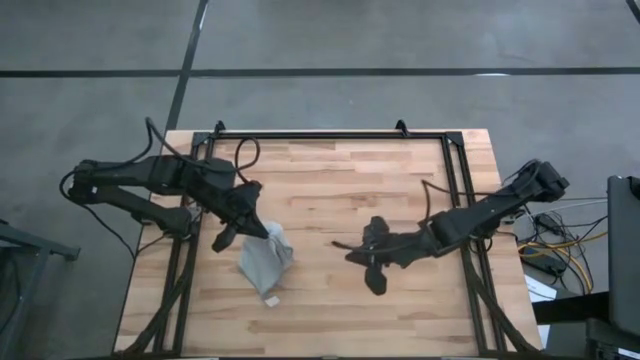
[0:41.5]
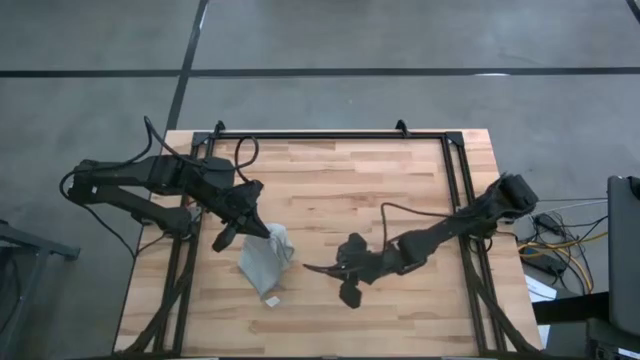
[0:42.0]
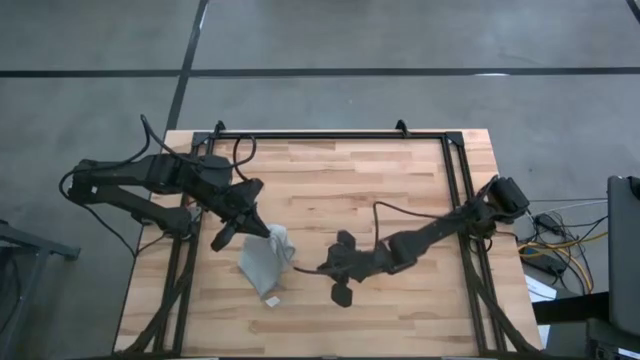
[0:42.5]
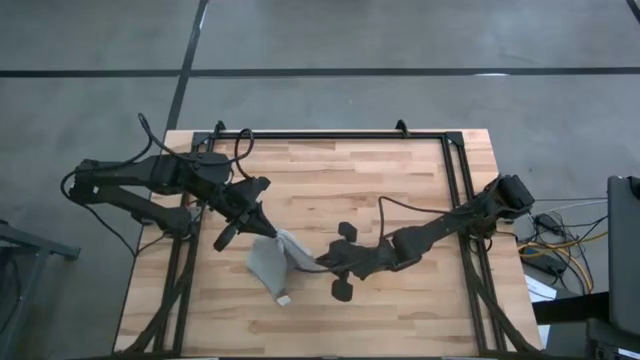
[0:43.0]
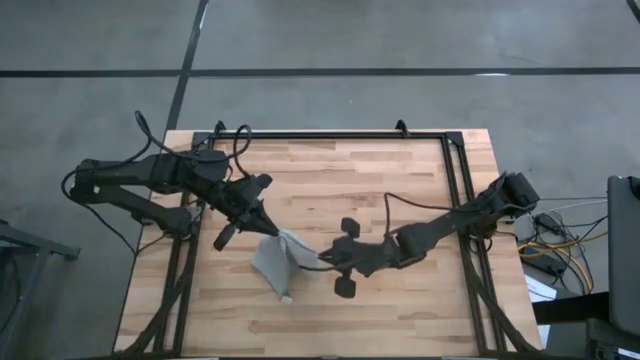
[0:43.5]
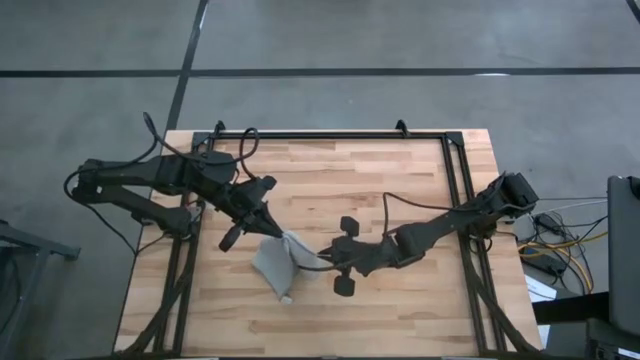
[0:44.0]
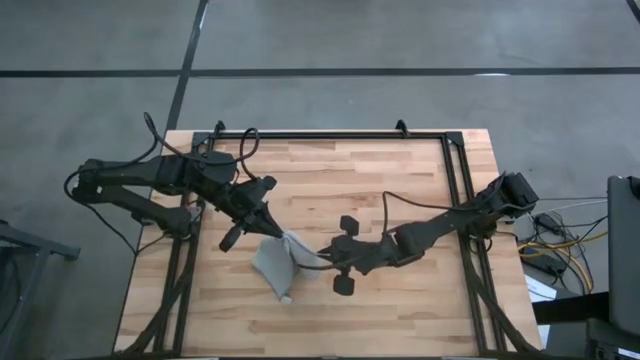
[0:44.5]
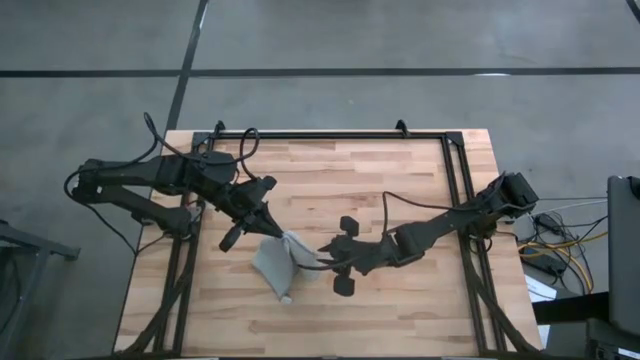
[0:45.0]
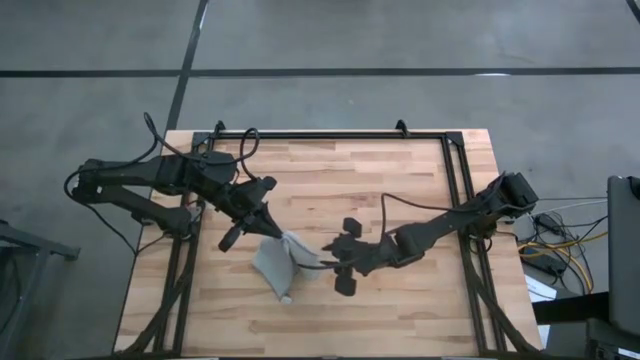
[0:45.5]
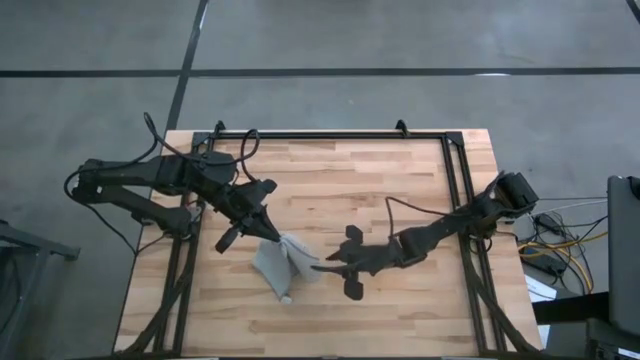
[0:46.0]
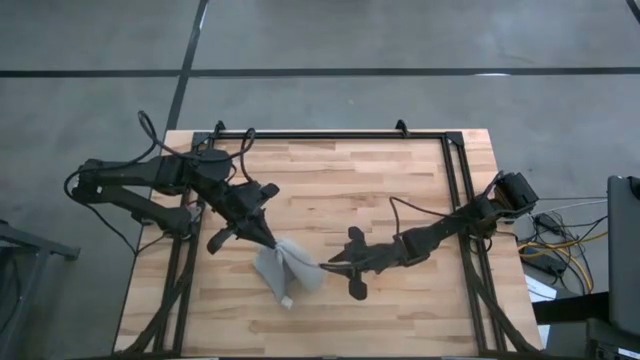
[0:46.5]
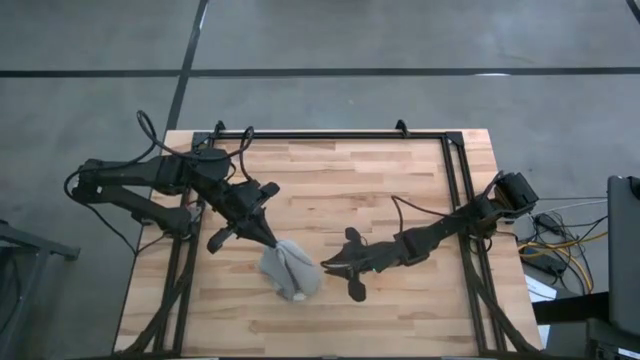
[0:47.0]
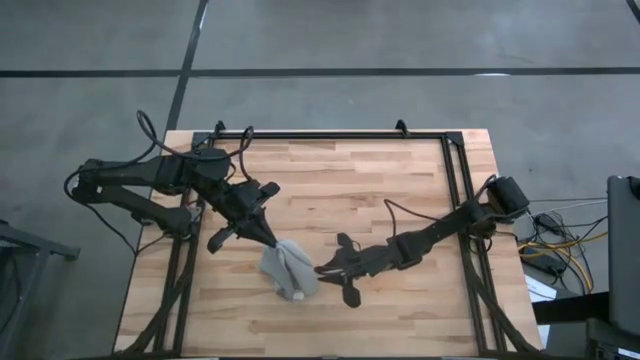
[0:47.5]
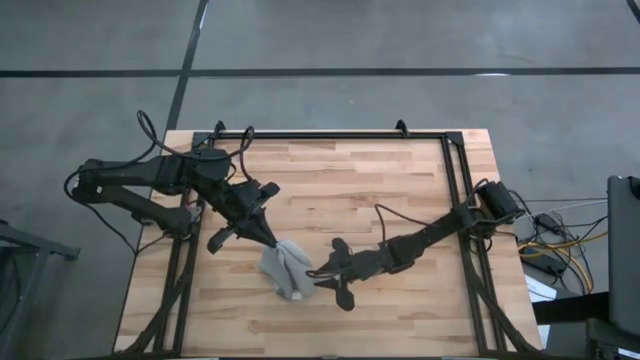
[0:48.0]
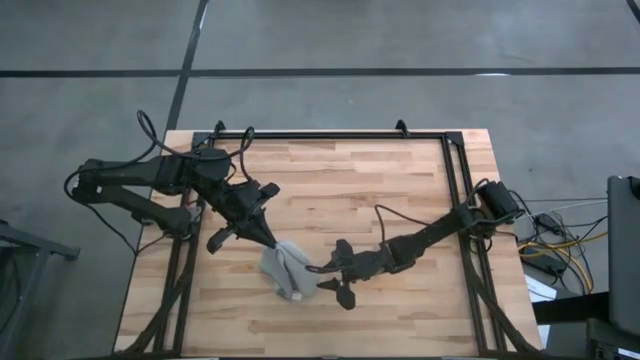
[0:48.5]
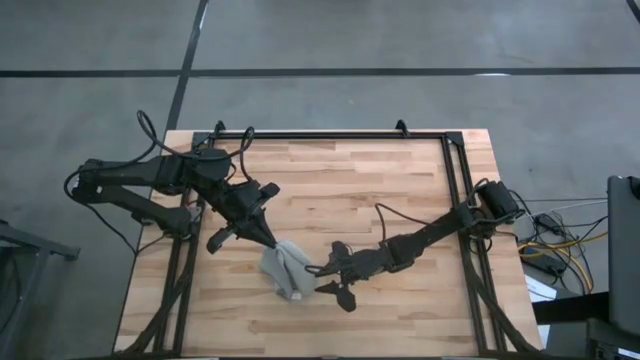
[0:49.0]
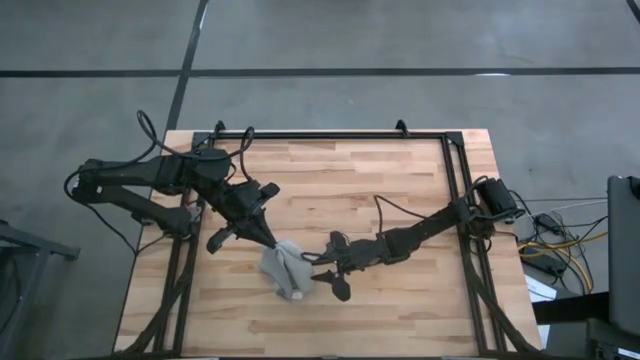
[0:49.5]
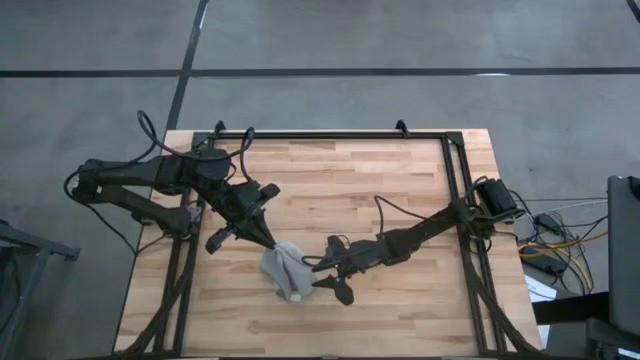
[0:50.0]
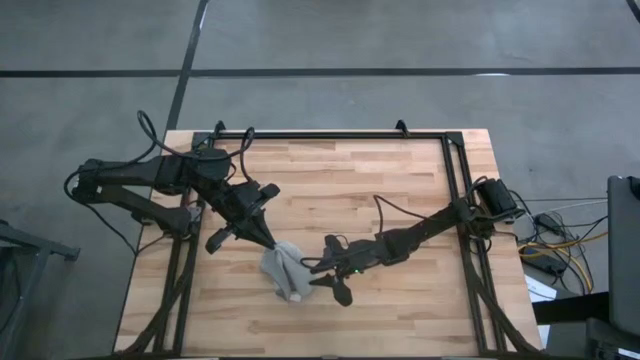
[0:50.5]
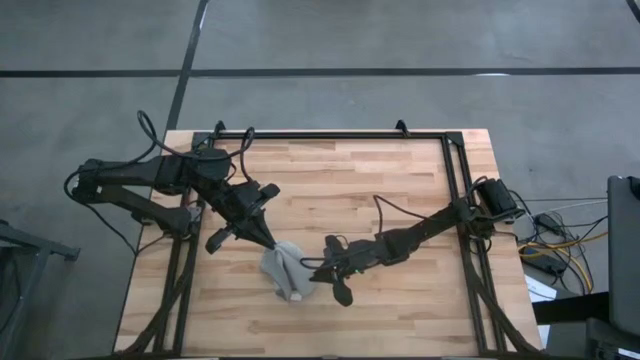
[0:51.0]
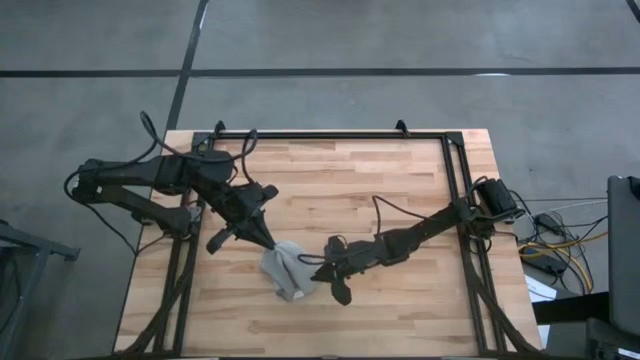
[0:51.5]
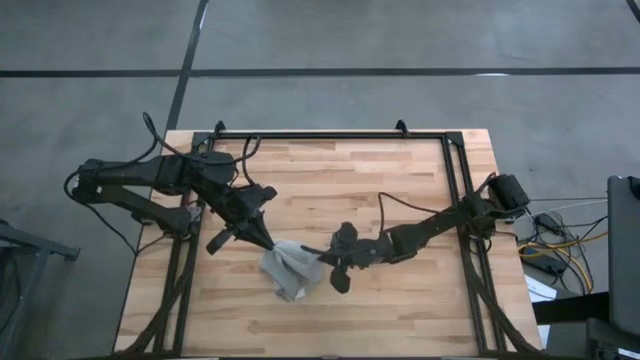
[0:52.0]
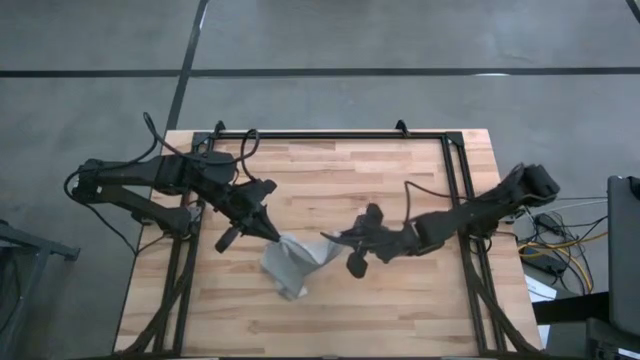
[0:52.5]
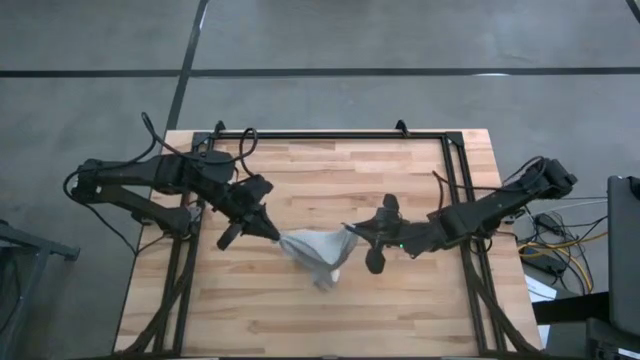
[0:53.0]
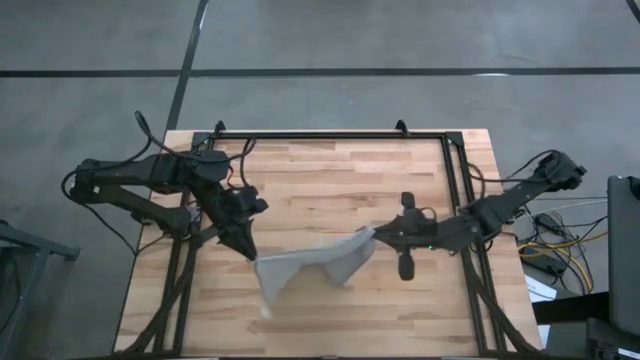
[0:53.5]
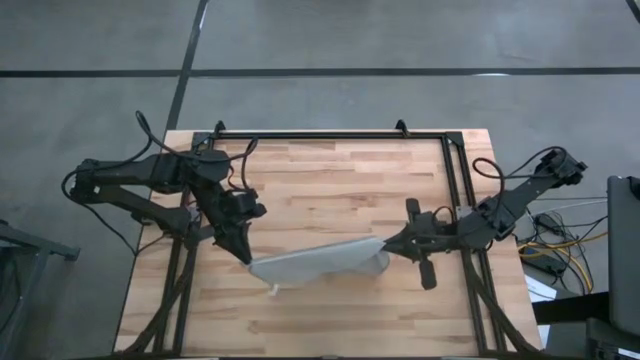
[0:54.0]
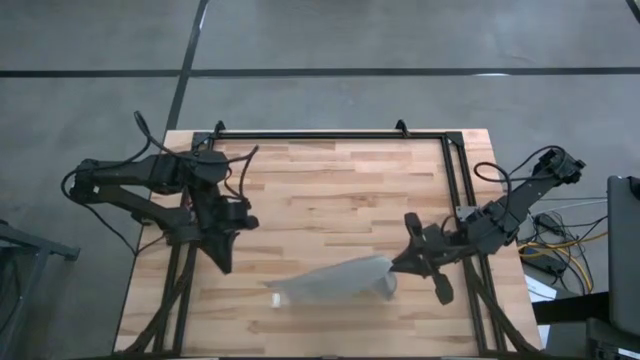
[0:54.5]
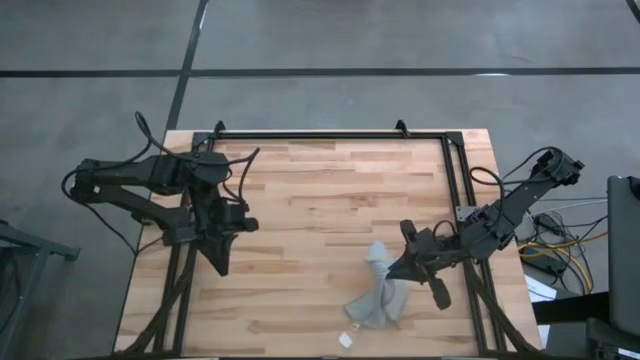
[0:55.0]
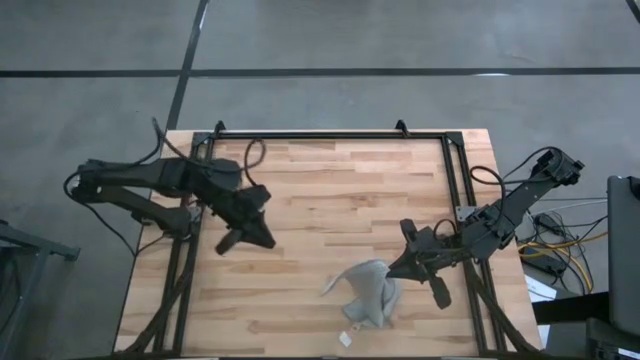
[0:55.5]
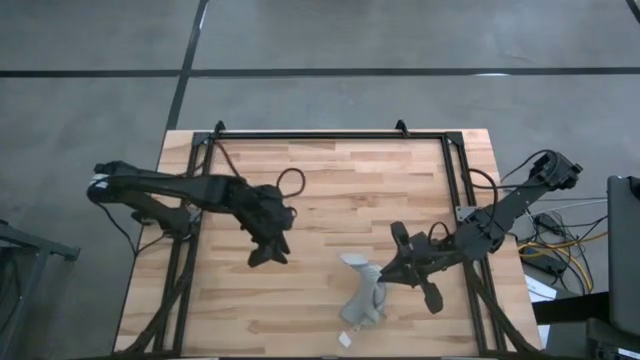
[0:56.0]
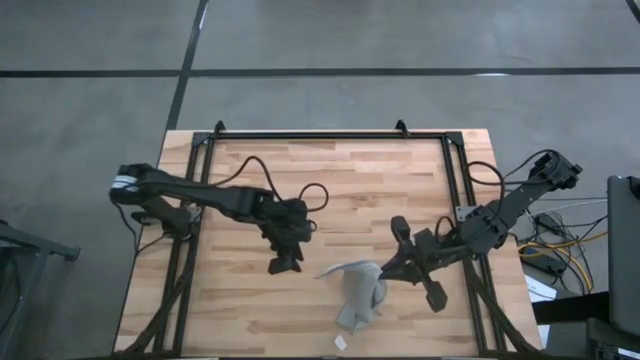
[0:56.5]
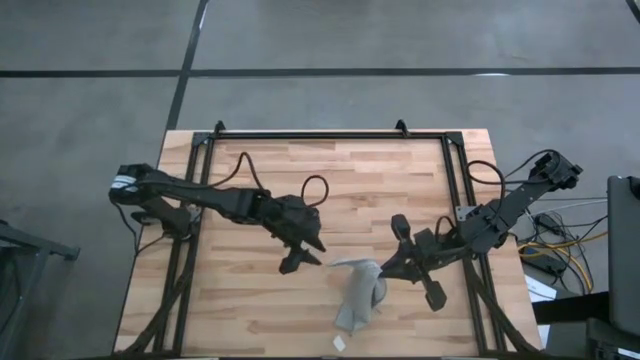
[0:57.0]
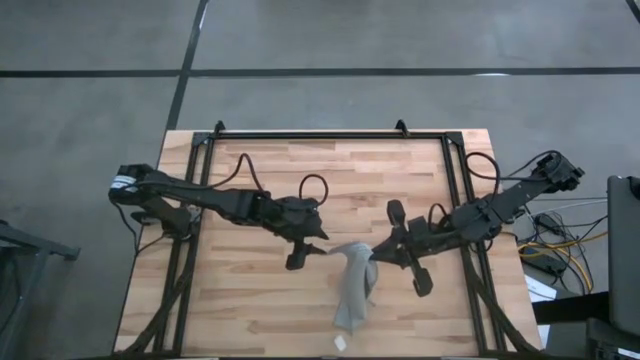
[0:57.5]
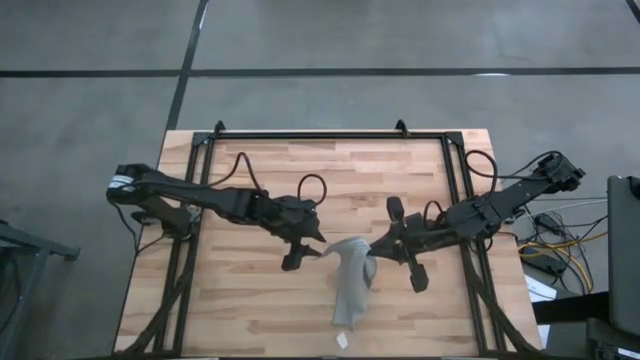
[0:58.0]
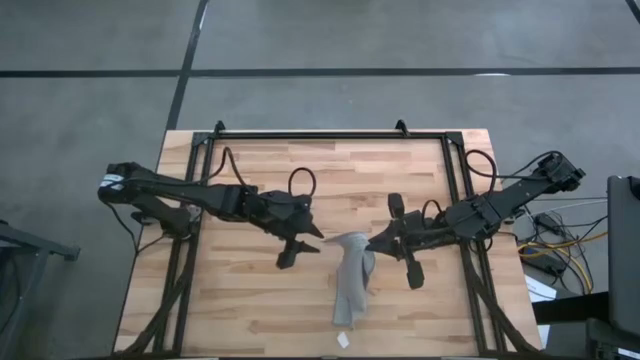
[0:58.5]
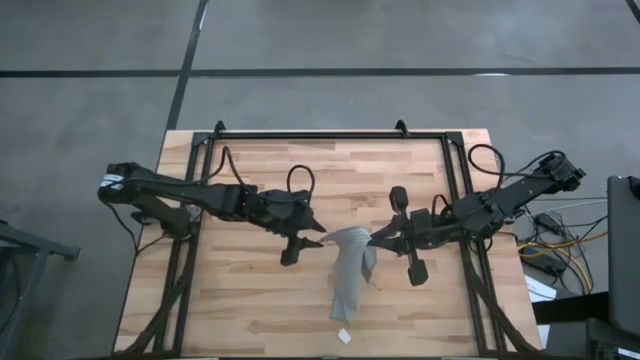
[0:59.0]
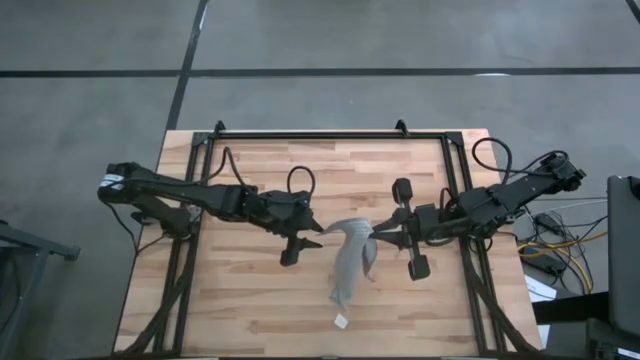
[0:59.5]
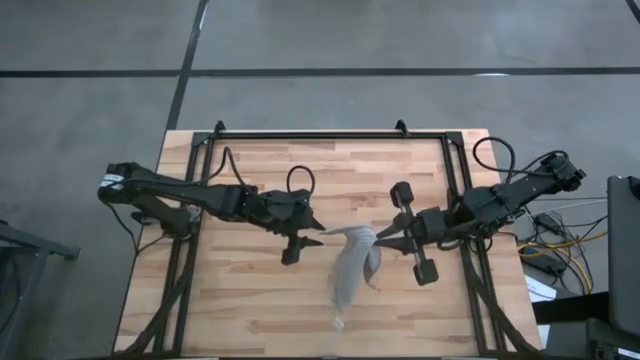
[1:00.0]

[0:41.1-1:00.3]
Task: Fold microfiber towels
Prepare the microfiber cloth on the table
